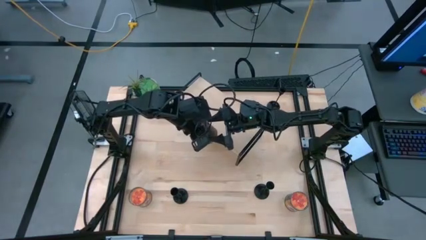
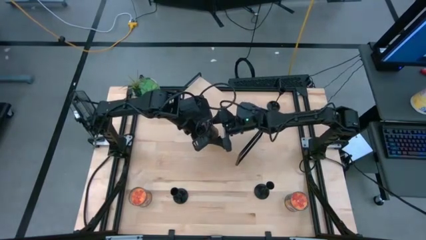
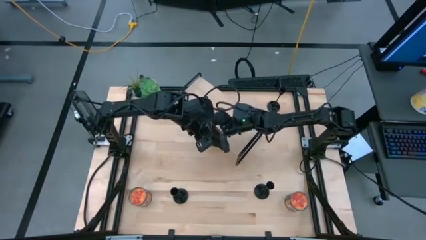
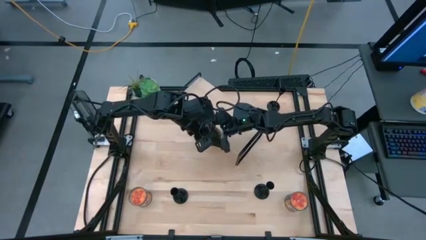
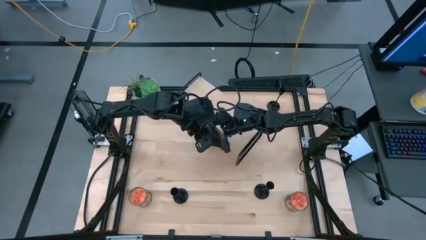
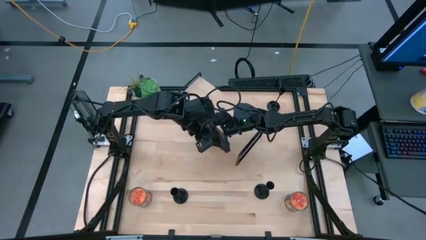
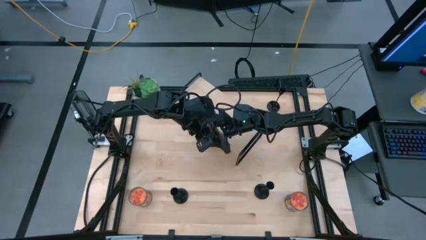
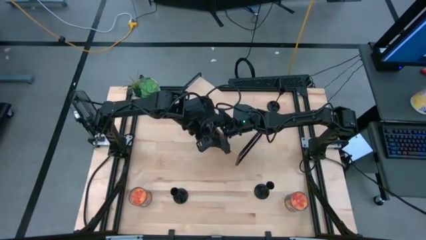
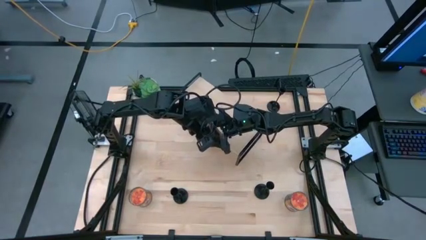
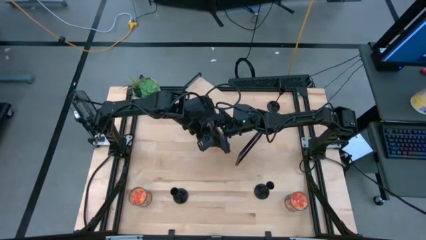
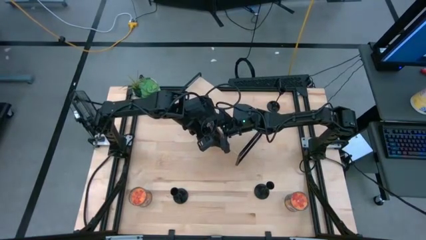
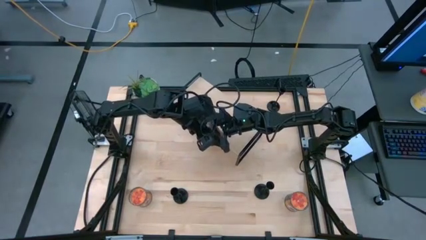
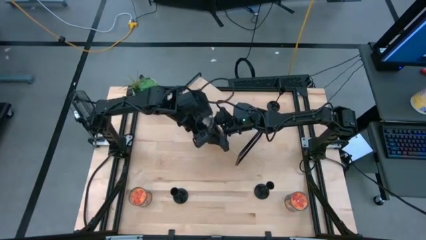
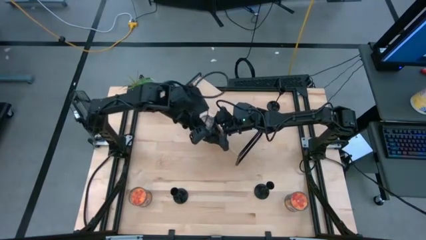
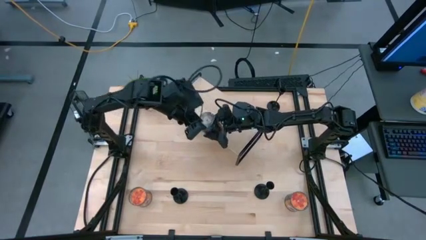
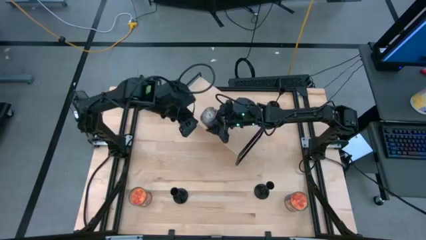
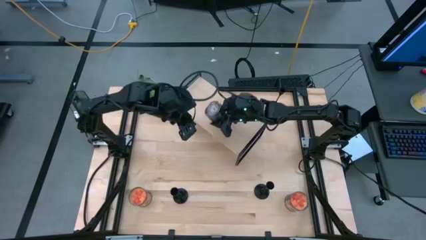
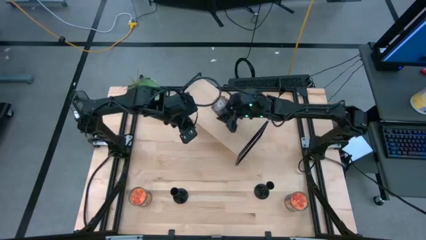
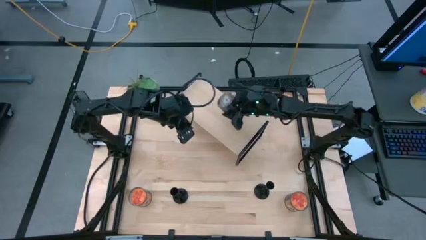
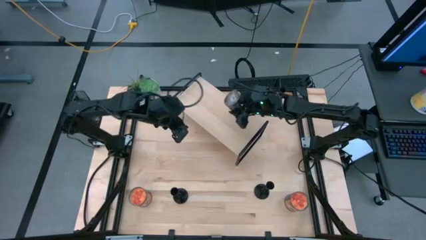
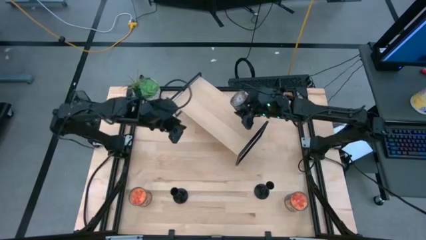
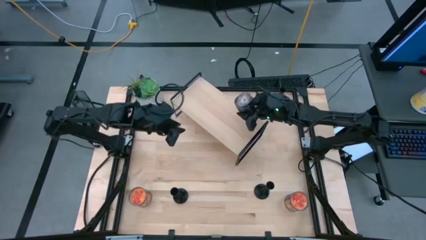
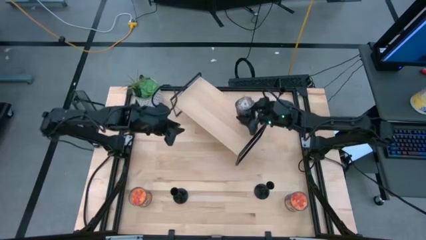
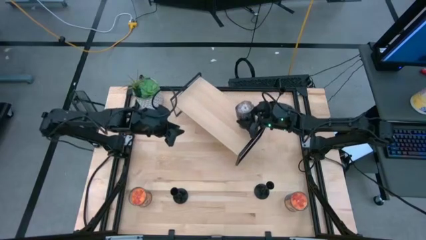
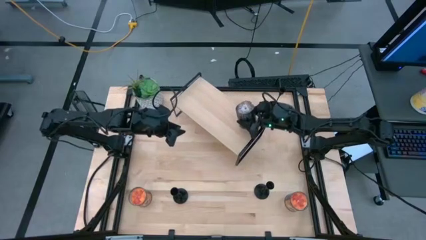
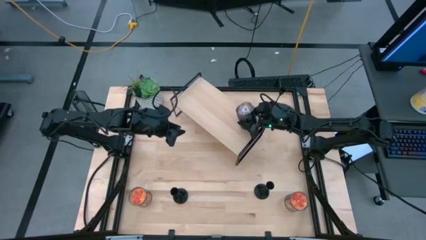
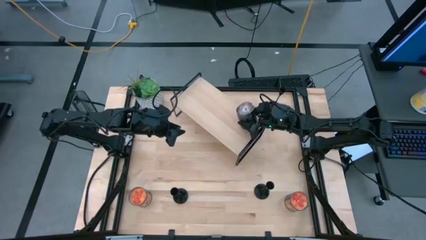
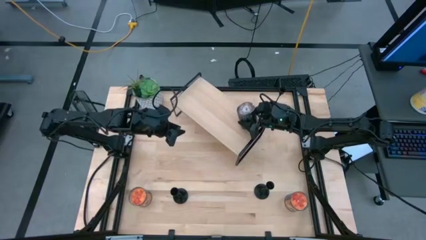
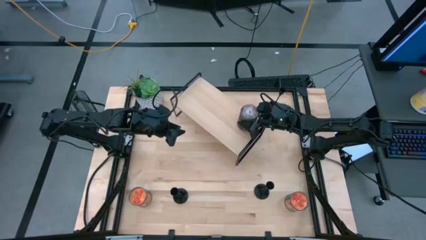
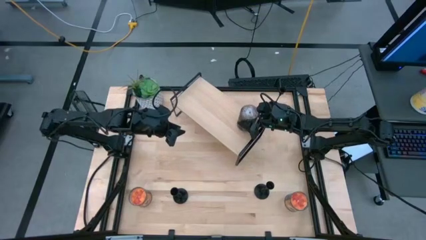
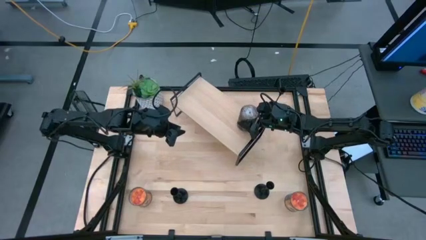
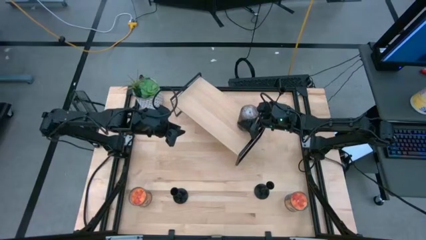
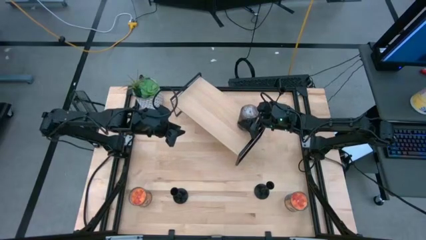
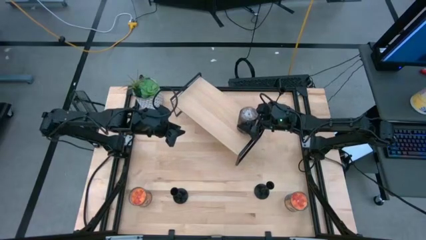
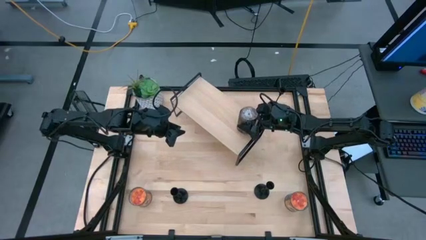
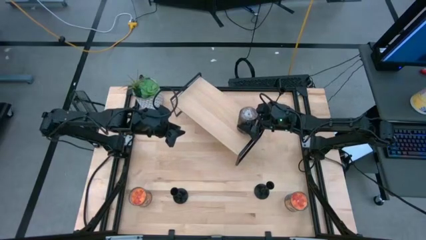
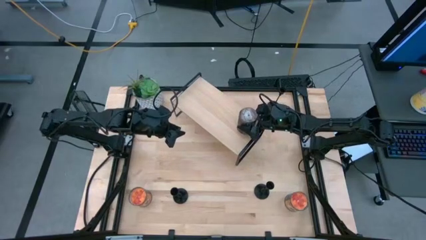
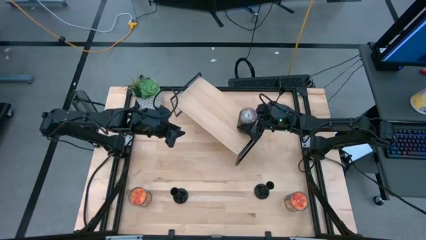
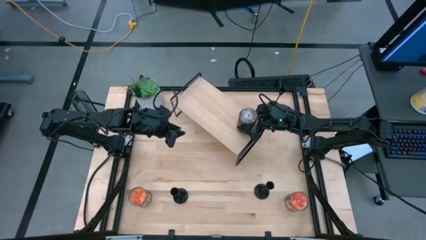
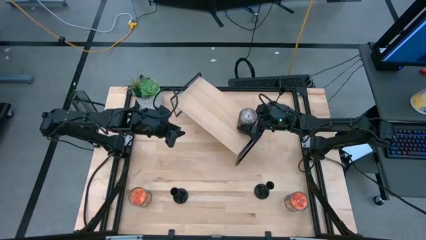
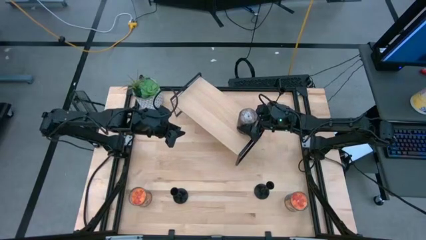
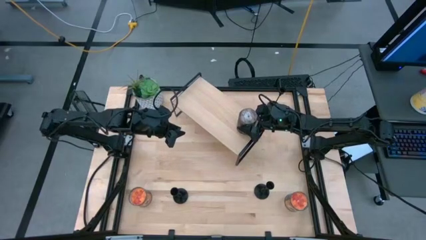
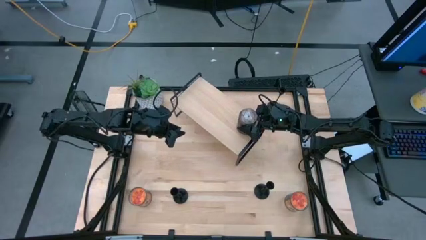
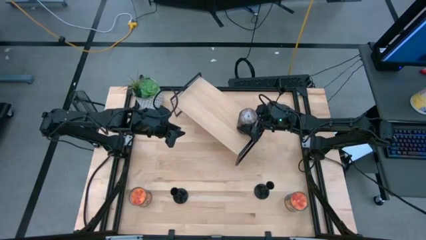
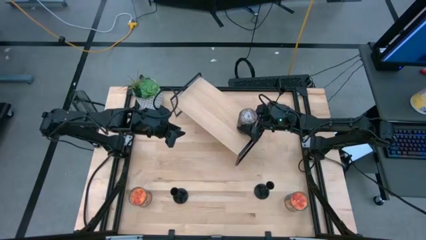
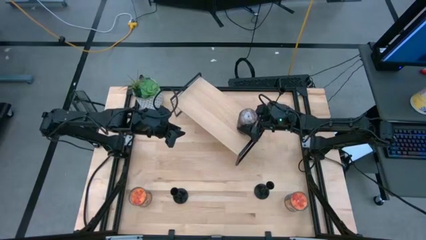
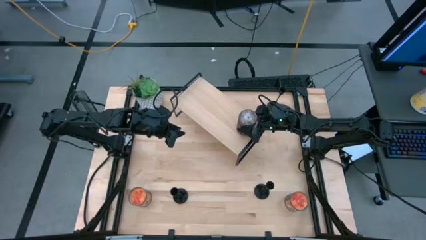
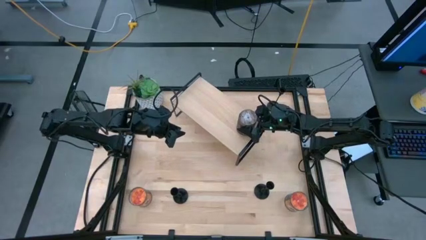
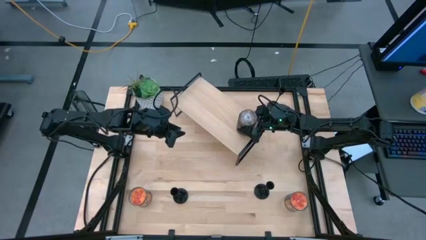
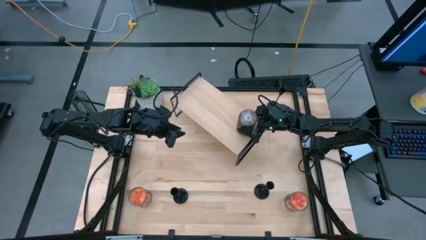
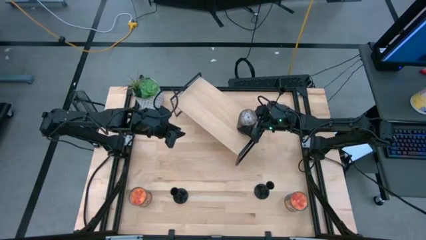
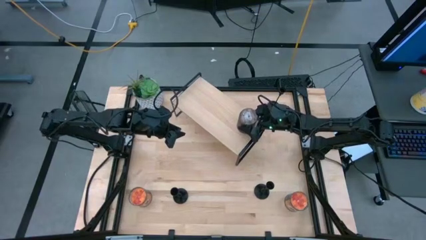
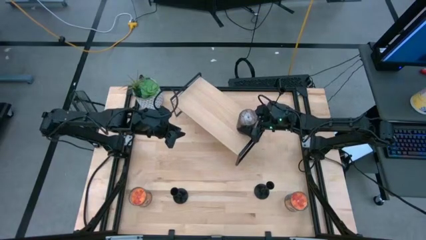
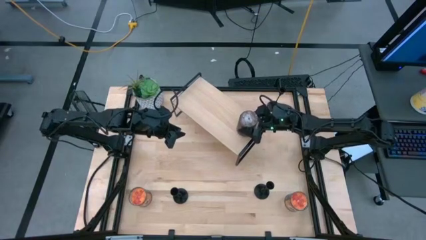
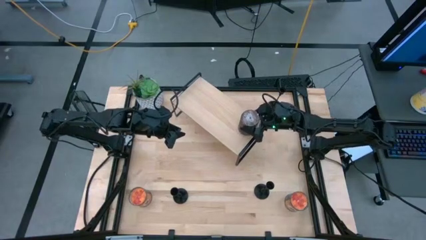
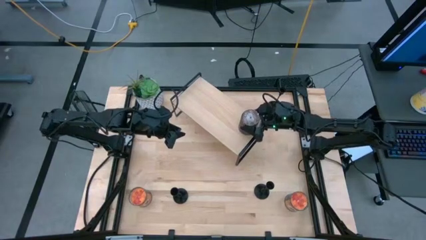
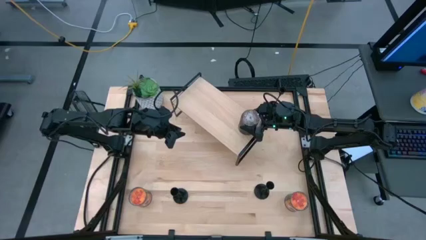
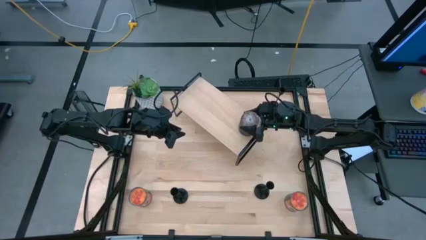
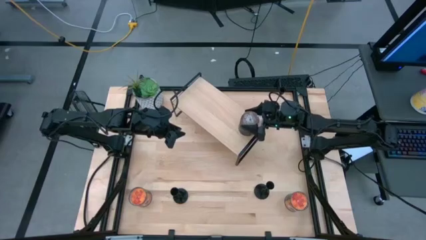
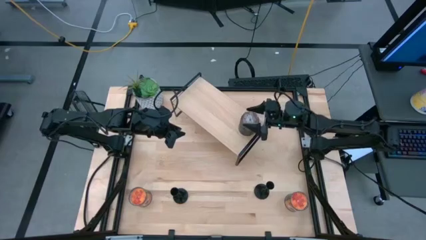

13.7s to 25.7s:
Task: Pick & Place candle stick holders
Put the brown scented candle on the shelf
